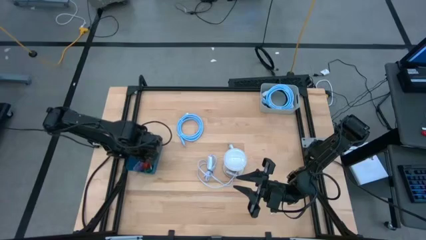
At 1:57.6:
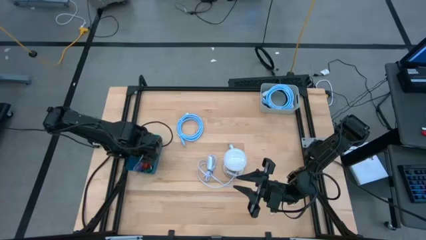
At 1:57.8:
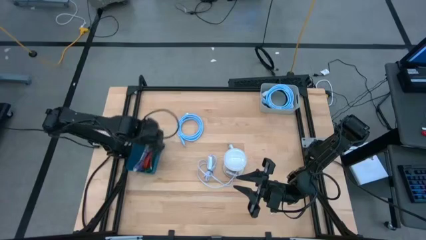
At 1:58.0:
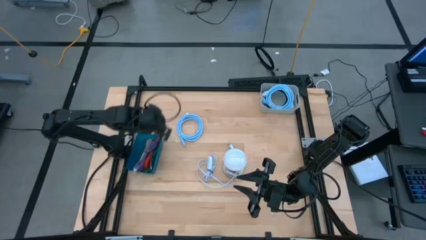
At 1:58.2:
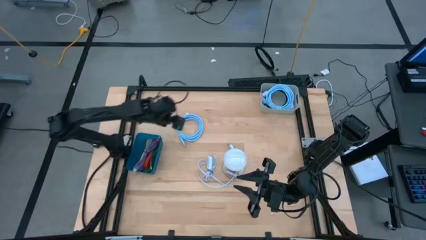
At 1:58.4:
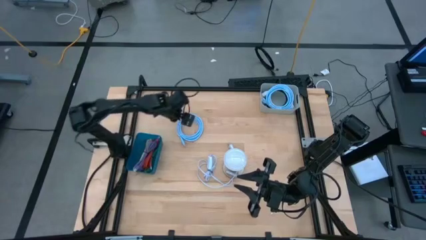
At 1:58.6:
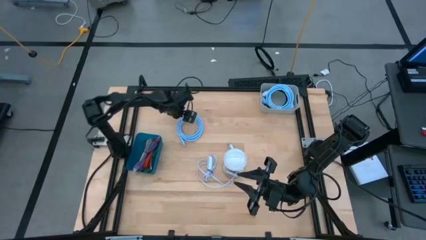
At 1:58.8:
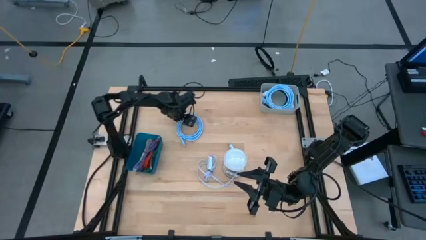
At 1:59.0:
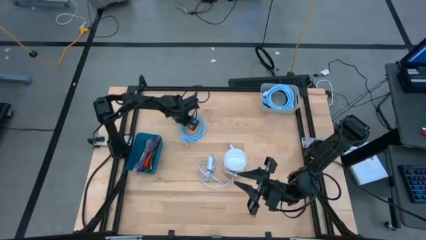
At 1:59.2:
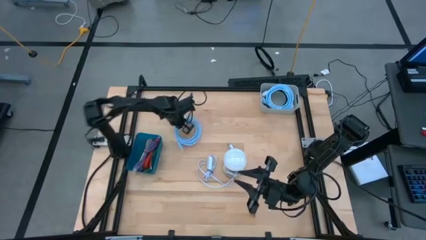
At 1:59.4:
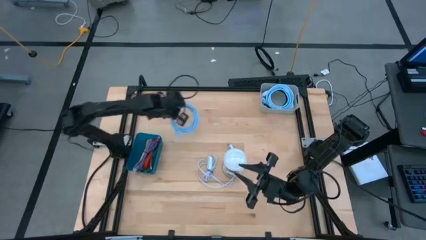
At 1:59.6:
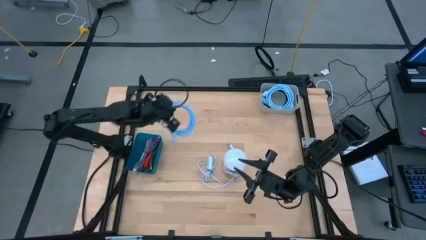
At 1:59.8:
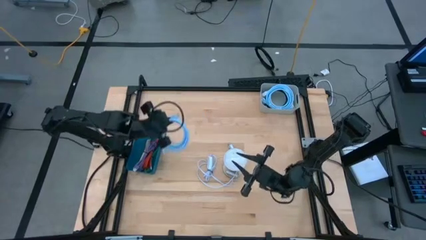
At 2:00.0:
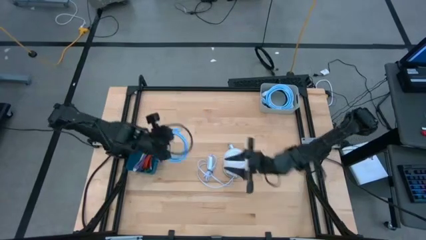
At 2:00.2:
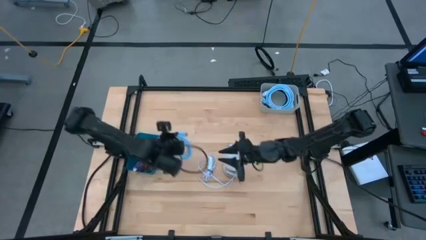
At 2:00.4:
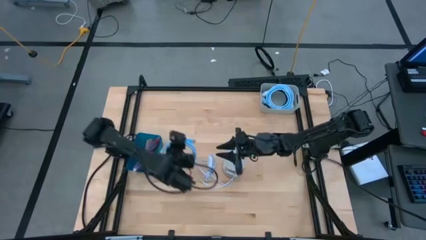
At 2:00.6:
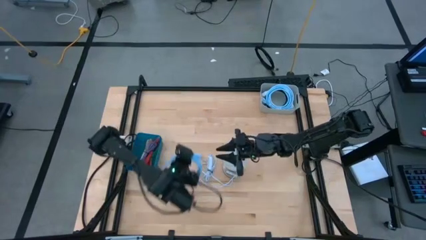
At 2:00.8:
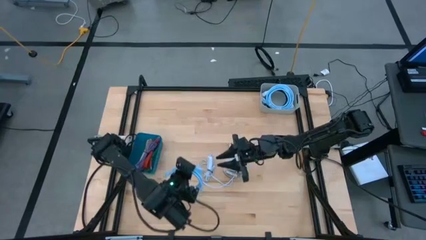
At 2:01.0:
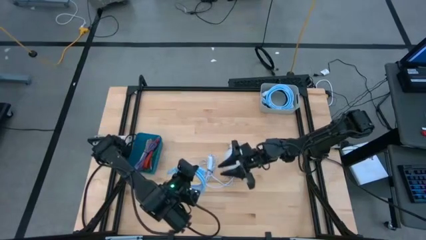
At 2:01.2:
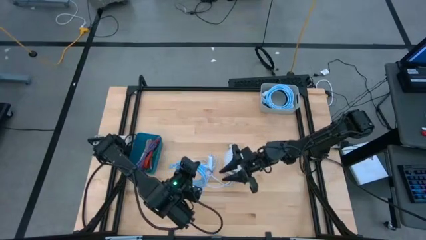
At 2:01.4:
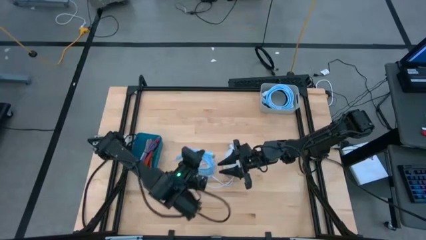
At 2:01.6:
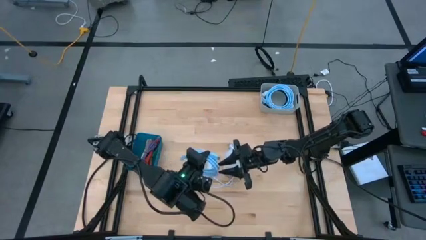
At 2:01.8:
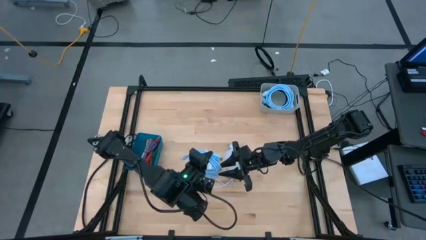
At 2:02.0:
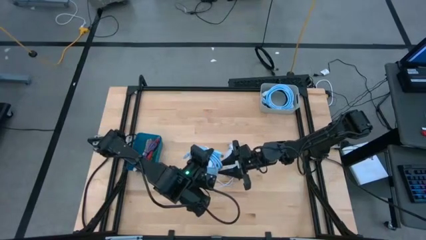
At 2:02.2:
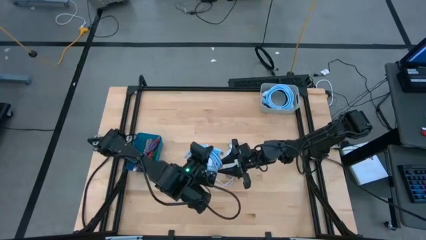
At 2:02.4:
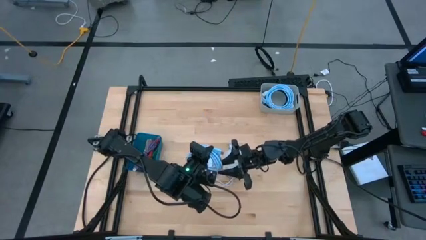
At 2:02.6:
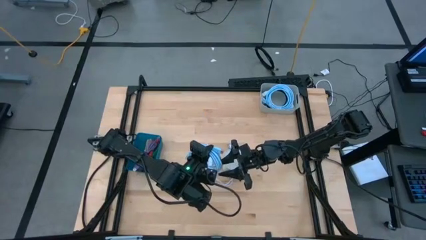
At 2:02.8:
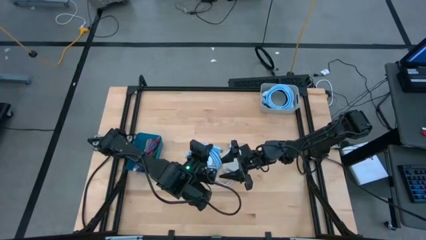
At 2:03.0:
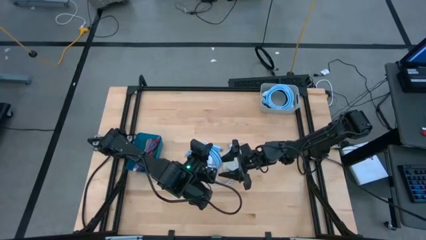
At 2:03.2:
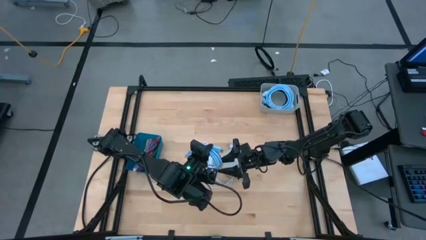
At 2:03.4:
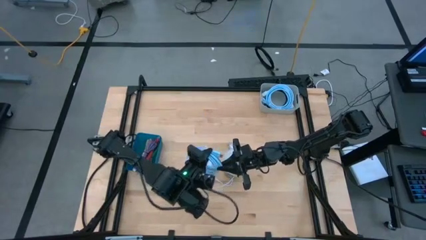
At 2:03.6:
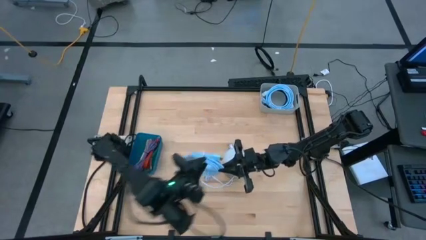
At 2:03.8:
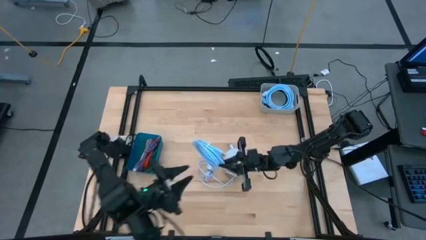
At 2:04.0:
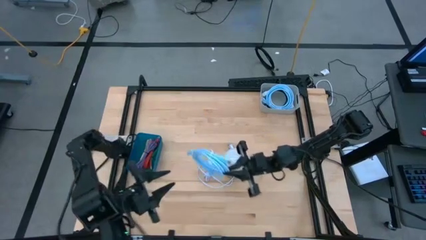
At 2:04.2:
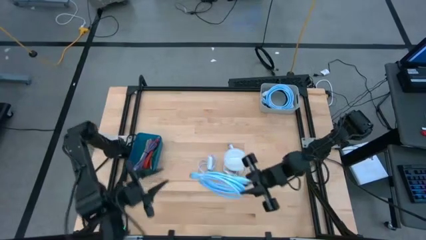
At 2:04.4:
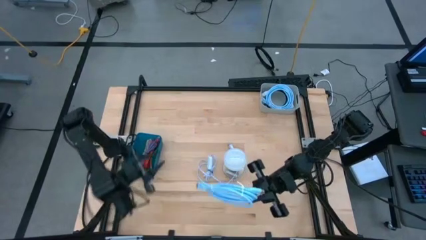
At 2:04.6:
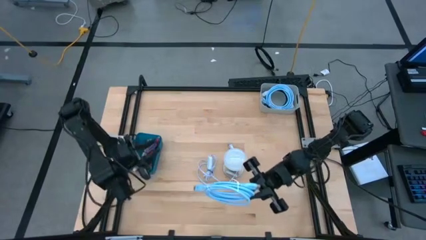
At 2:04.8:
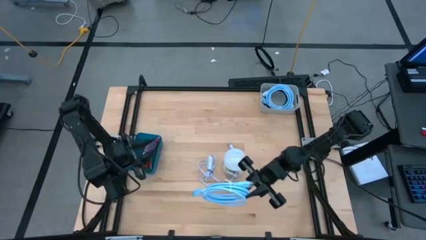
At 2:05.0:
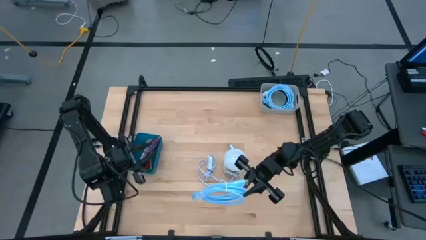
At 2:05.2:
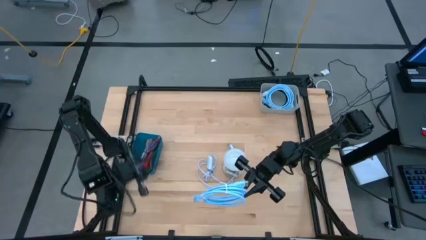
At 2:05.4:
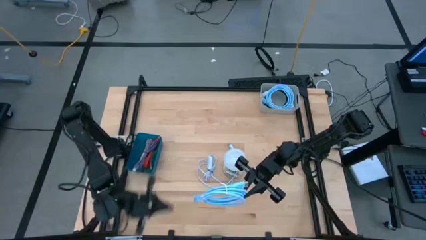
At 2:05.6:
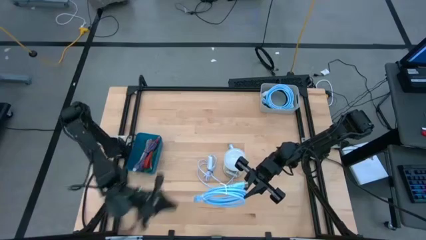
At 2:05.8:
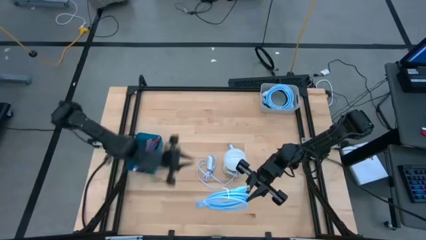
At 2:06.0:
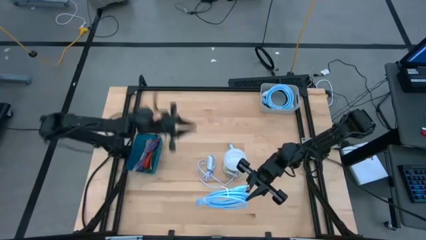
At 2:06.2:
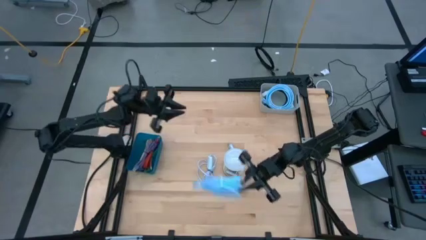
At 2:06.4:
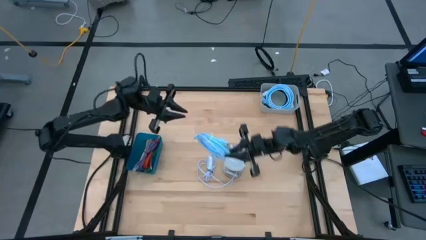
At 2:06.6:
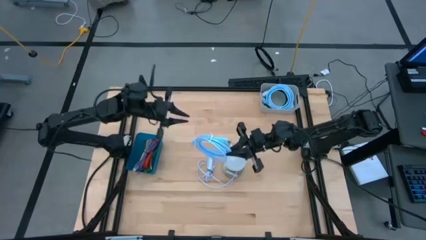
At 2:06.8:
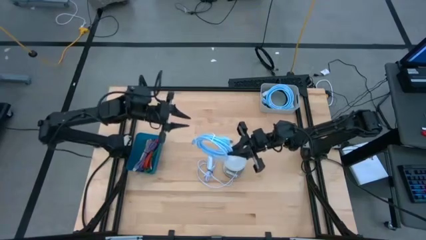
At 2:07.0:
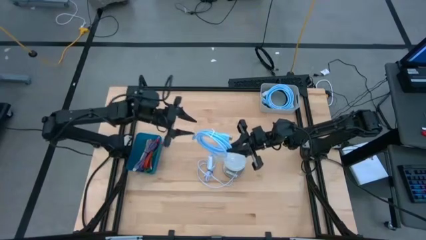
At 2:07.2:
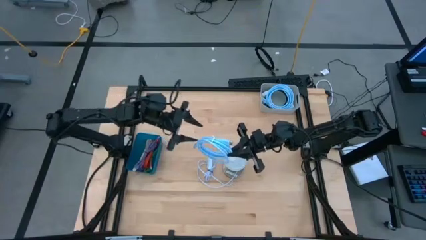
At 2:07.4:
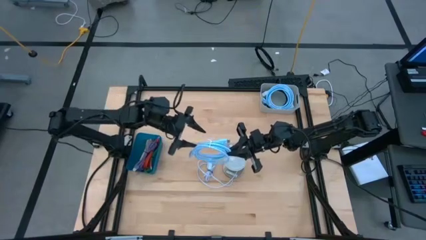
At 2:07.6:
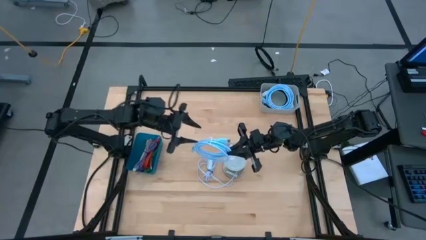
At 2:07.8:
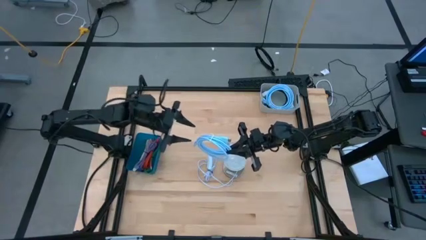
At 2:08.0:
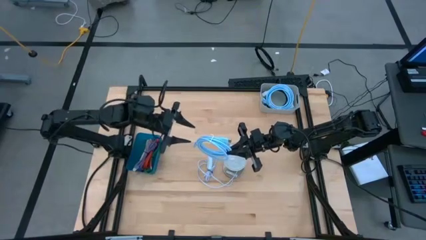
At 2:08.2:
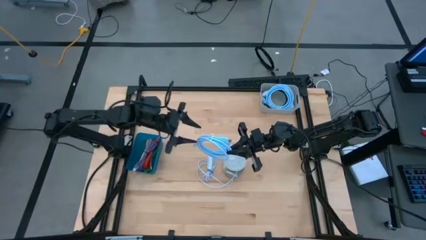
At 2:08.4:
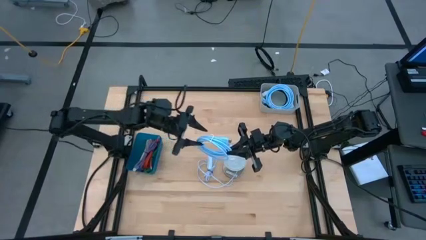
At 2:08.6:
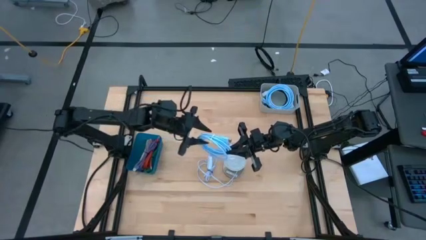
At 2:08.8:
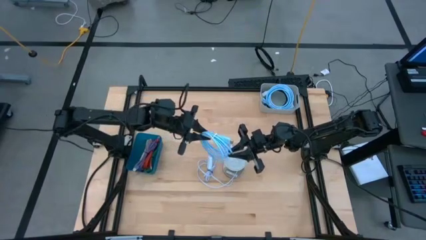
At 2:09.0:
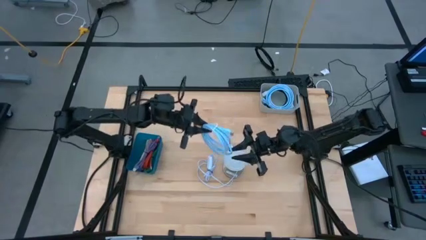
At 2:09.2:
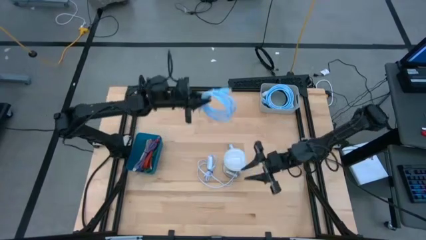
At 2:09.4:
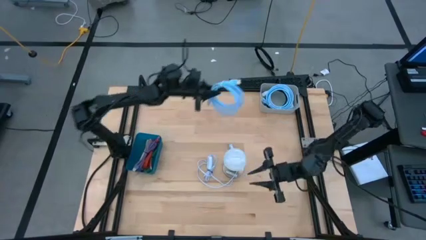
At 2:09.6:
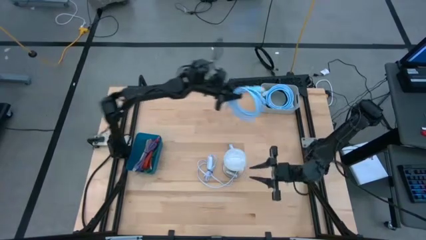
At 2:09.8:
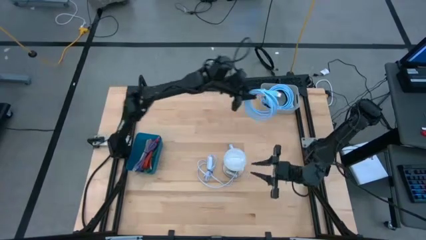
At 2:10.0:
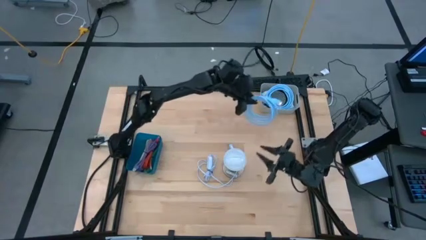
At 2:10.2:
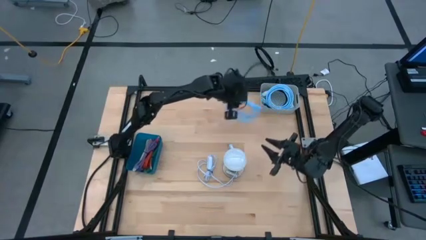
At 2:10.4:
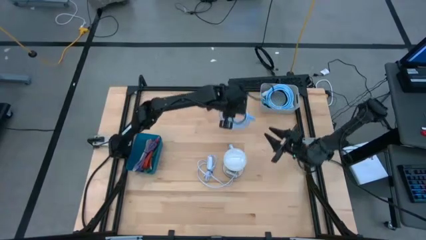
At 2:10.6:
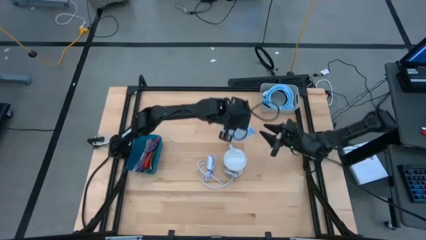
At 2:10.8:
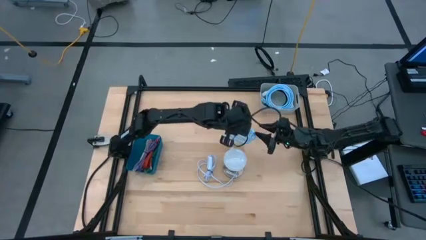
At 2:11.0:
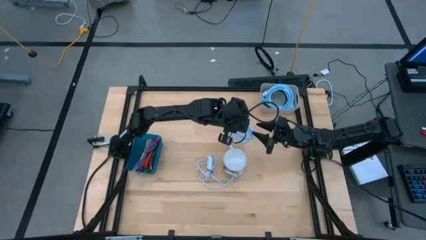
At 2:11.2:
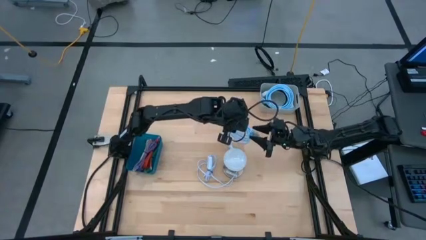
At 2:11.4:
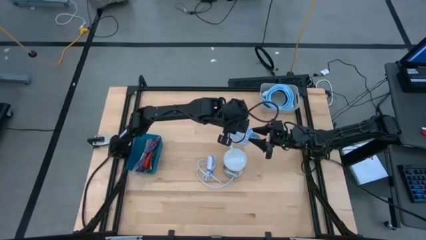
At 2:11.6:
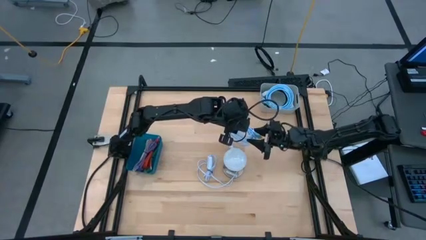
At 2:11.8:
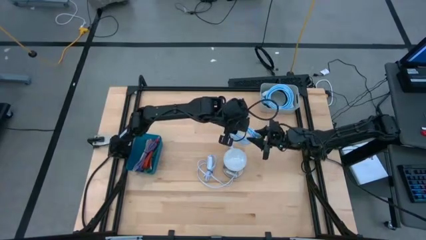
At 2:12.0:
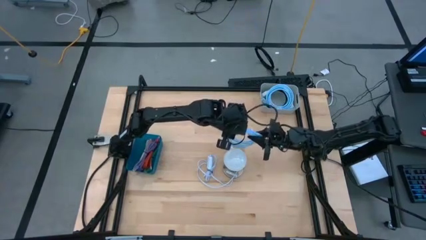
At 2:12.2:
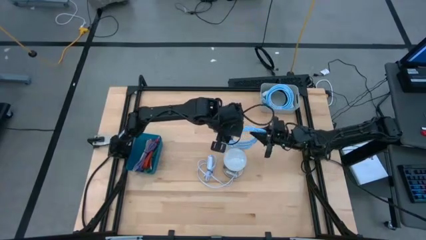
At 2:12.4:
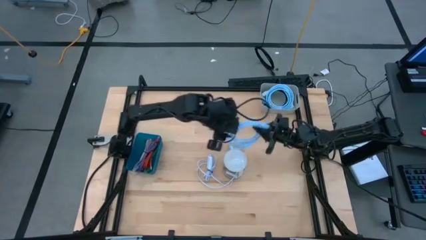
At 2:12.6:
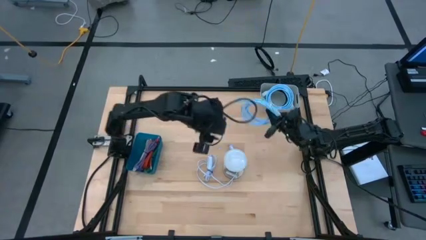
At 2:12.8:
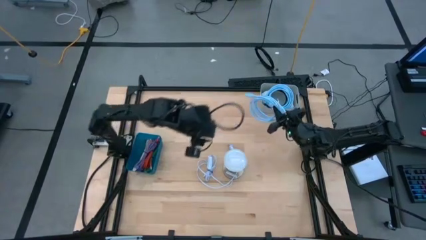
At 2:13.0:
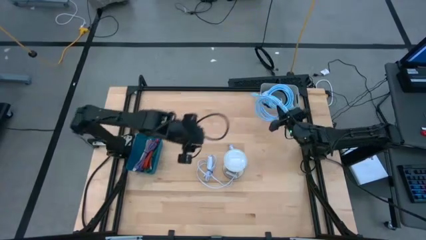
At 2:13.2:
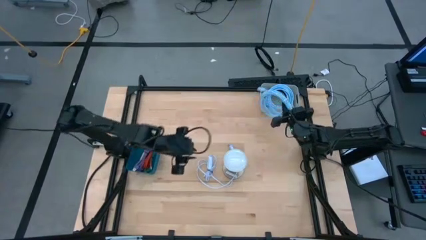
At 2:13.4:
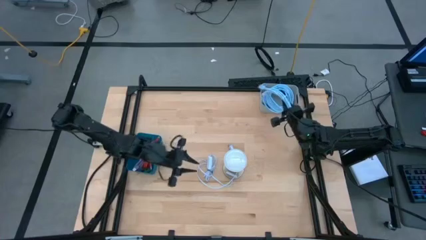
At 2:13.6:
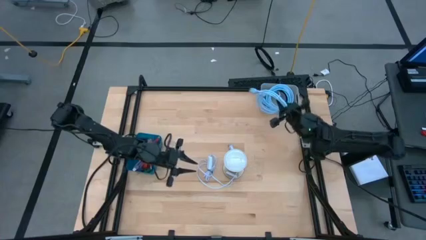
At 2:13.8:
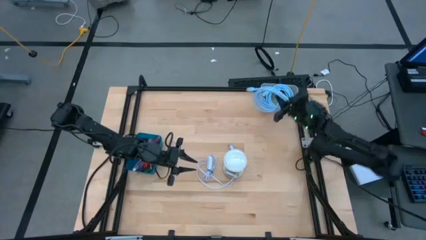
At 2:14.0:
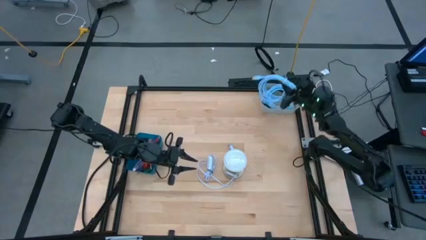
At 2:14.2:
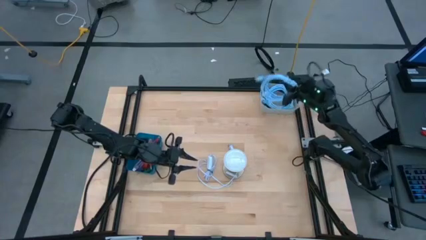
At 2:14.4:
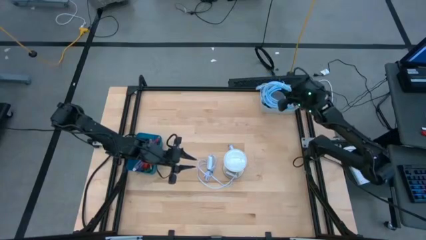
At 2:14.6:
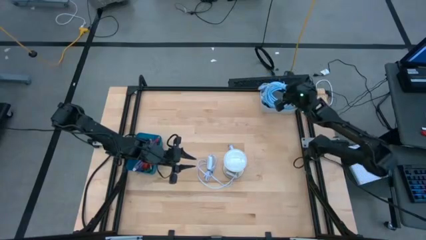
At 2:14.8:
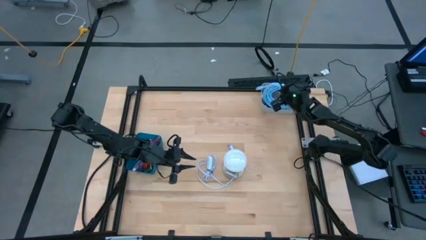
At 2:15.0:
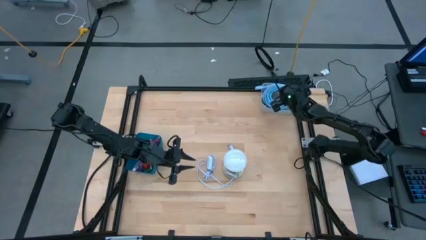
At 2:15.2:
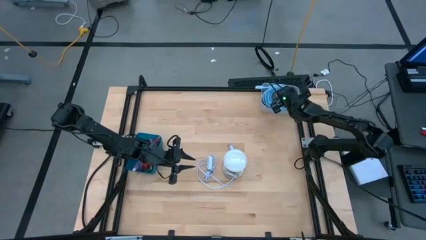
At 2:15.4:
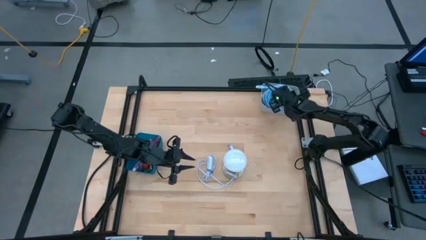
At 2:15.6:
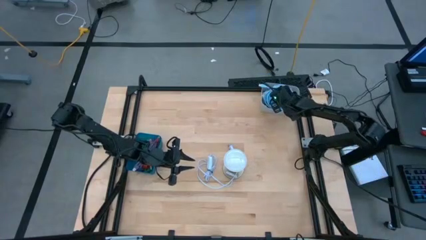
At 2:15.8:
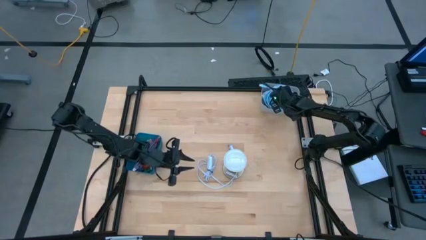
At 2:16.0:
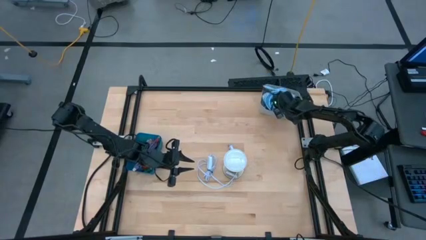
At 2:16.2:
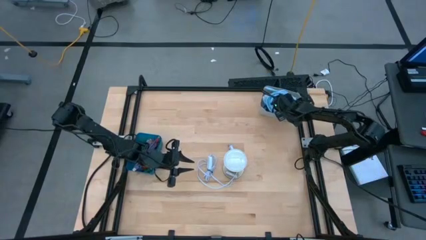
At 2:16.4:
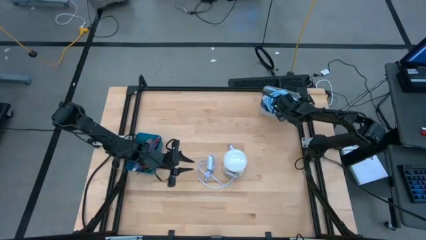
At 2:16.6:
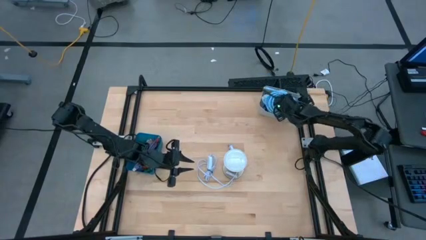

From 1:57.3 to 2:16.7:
Task: Pick & Place USB Port
Put the blue HDMI cable into the gray bin
